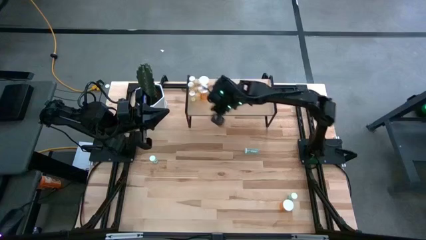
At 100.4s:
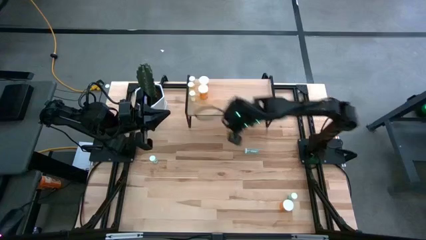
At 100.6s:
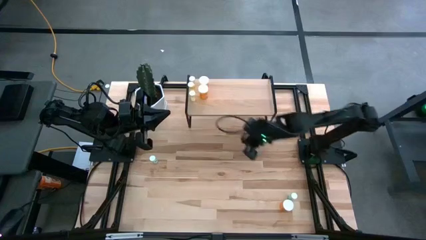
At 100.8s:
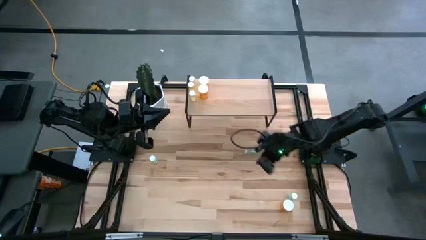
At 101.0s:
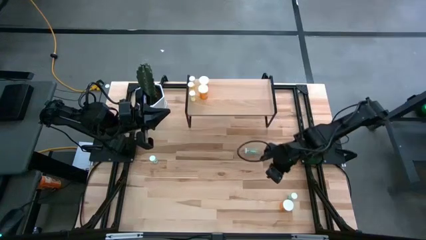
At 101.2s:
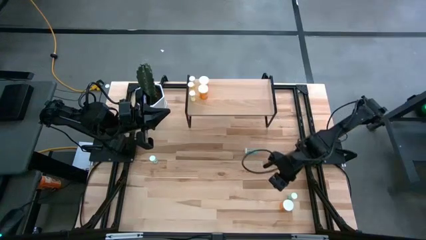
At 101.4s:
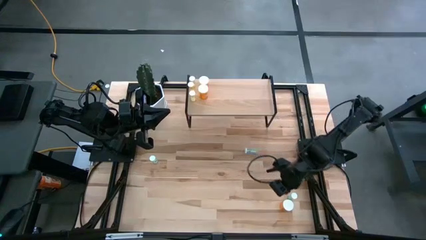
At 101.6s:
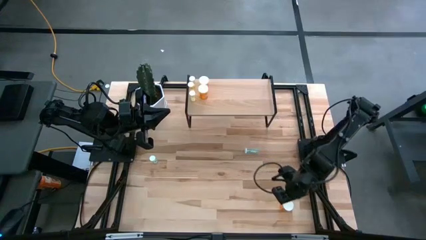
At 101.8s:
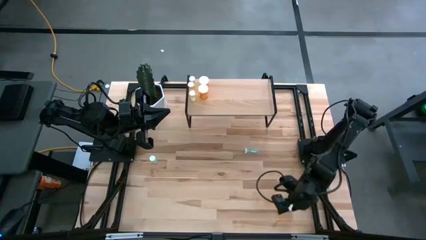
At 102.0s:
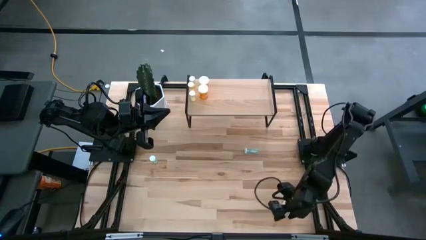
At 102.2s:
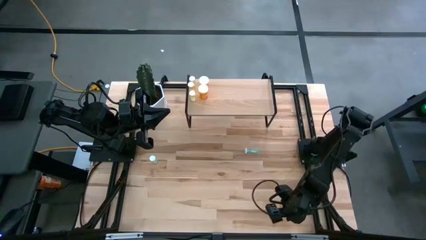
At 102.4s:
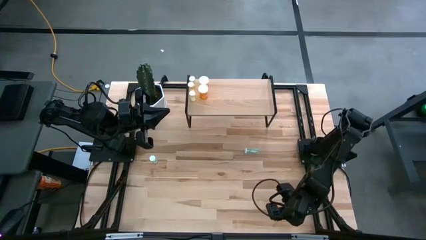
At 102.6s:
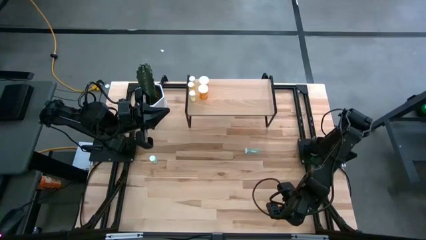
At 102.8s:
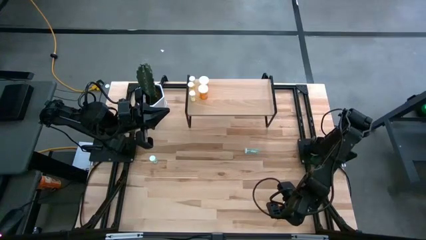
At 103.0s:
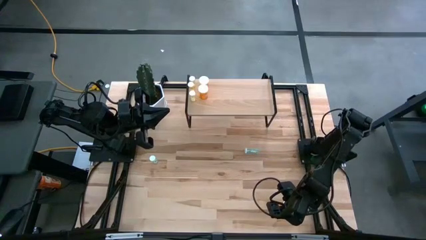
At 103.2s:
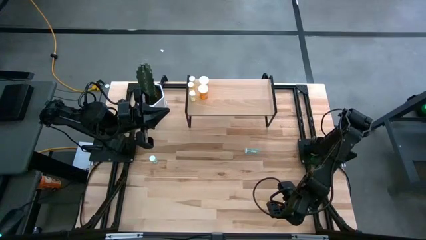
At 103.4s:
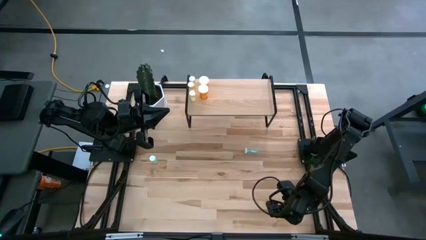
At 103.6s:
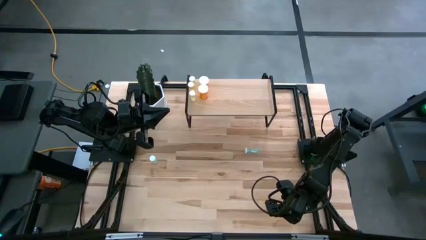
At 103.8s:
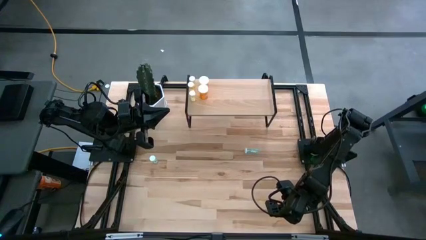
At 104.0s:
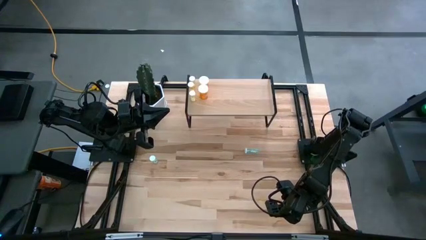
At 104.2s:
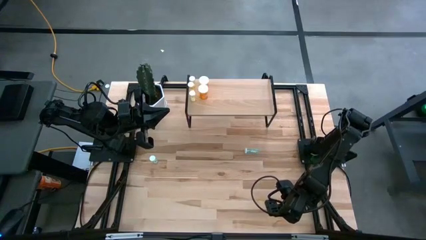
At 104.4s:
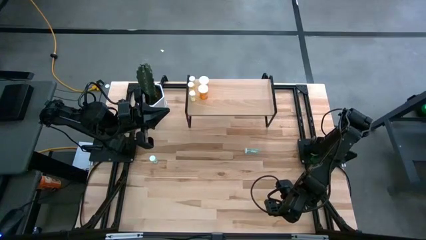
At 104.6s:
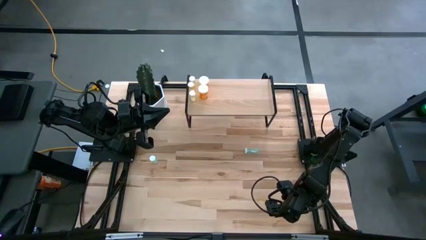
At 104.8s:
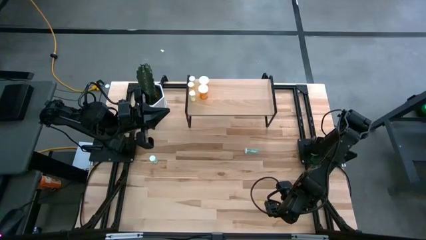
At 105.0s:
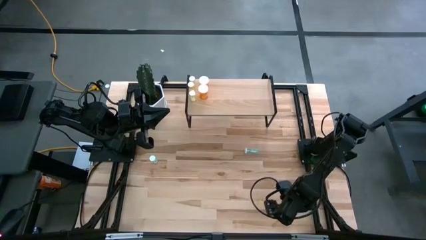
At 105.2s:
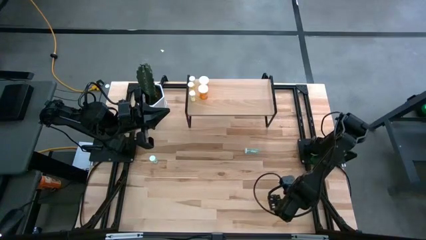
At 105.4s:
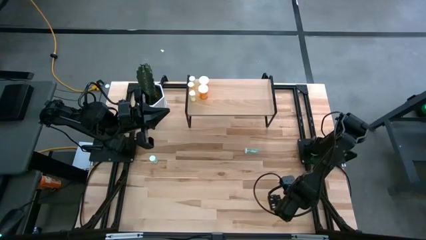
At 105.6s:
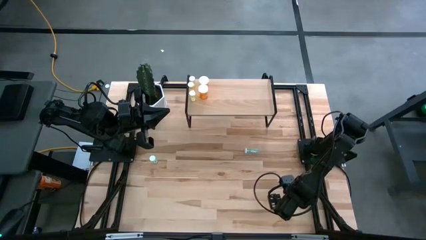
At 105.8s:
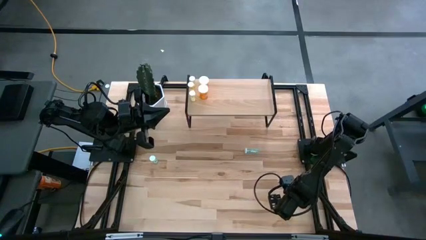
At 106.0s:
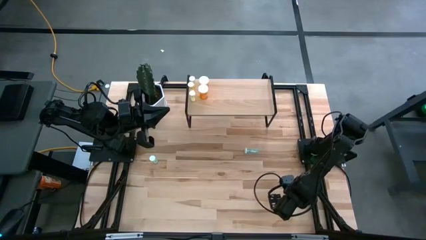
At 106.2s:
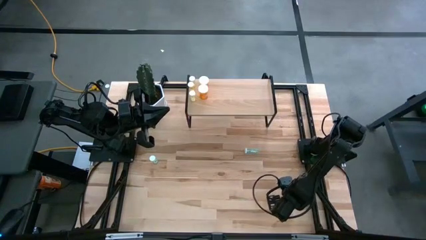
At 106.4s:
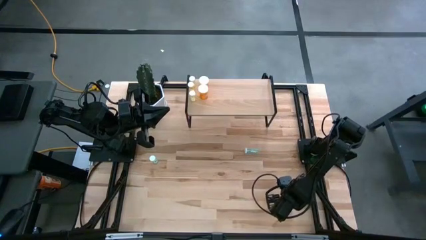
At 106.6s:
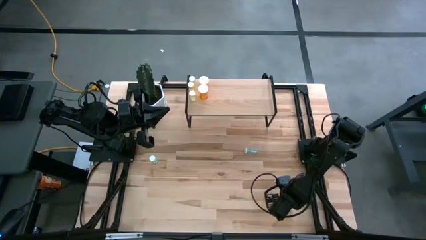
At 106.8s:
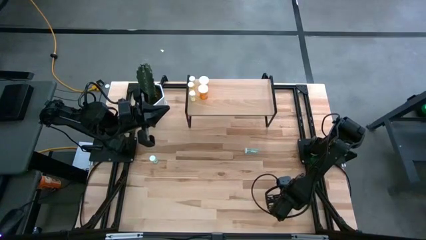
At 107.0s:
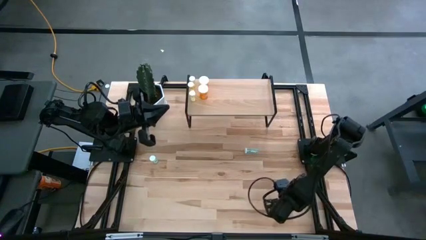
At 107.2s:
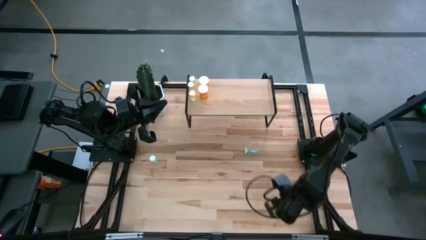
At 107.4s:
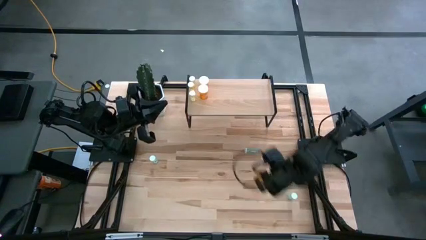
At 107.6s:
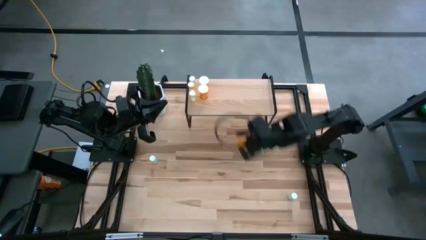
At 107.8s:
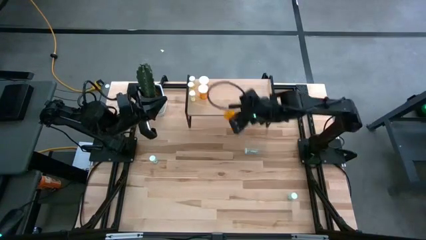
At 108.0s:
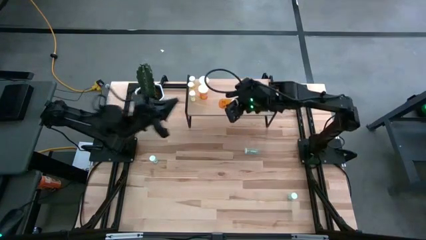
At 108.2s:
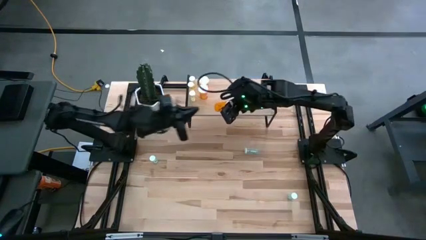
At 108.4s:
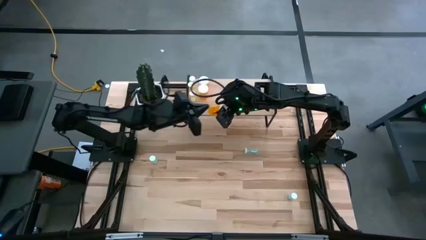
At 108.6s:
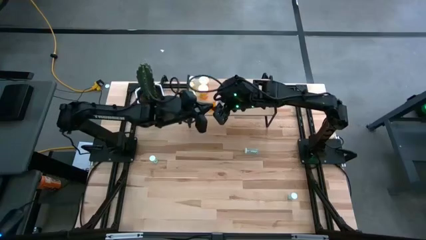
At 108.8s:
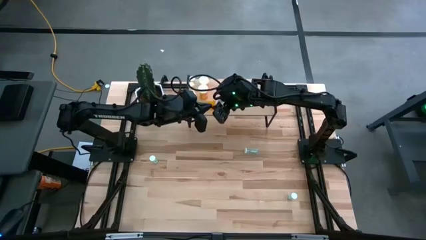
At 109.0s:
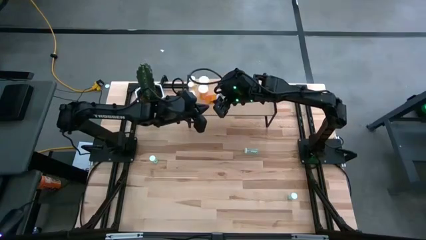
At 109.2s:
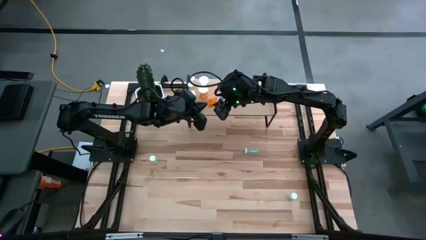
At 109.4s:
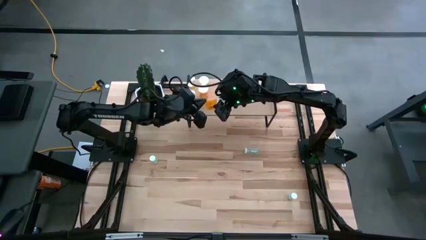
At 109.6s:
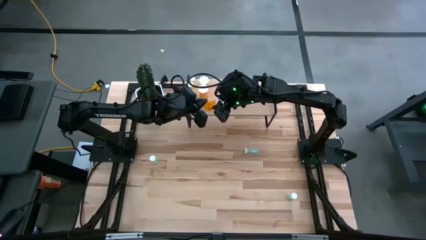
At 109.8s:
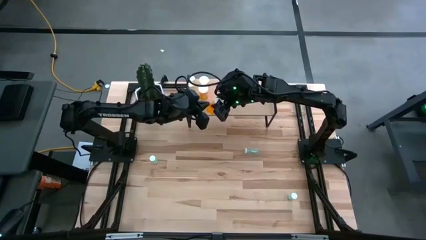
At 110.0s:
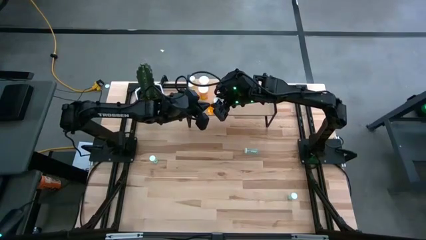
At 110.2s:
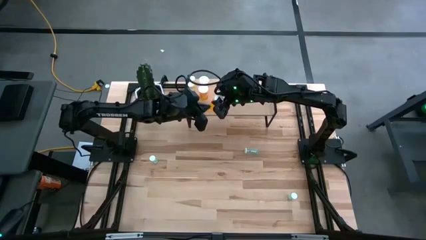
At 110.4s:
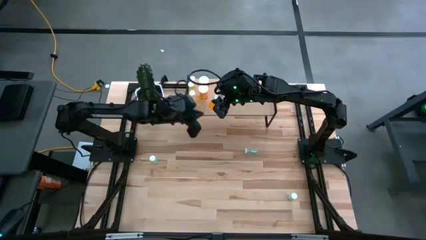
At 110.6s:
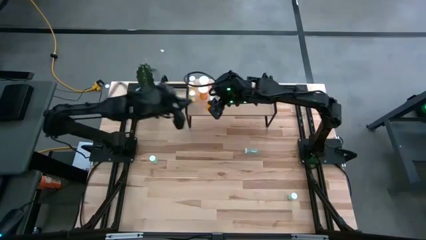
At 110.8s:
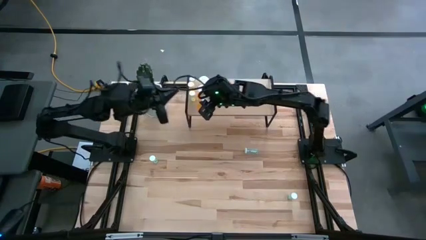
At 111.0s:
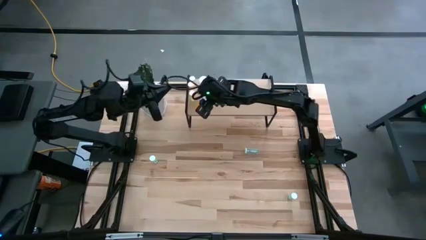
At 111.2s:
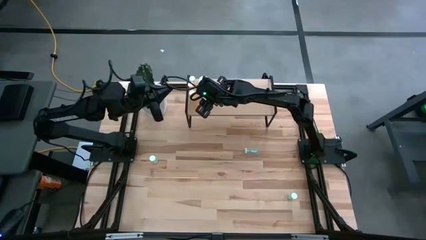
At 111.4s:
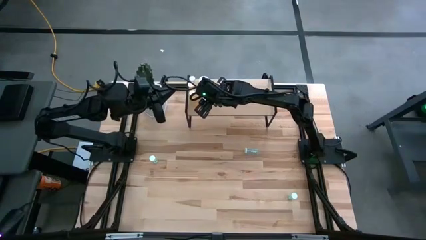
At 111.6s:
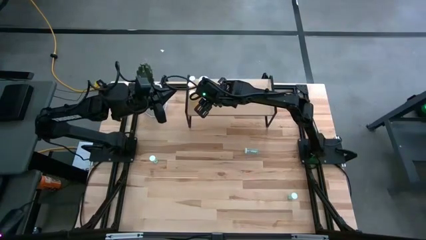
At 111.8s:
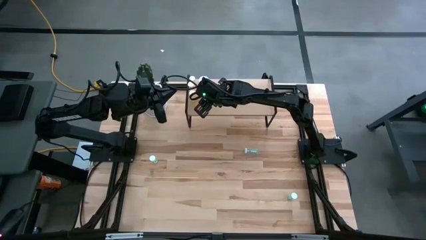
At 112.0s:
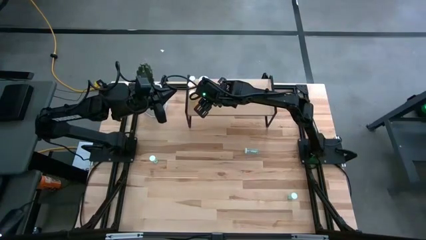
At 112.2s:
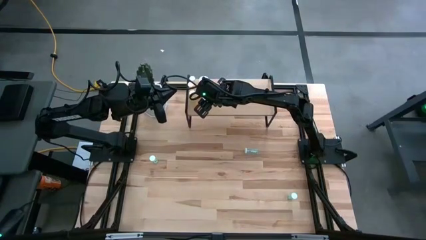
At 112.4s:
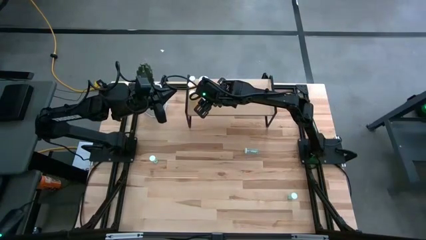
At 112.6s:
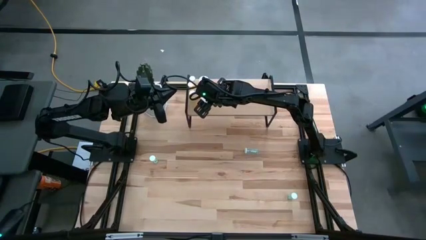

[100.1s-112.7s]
Task: Pick and place medicine bottles onto shelf by color
Align the orange pill bottle with the other yellow pill bottles on the shelf

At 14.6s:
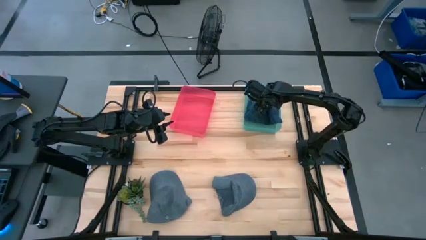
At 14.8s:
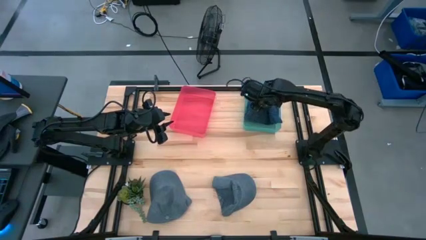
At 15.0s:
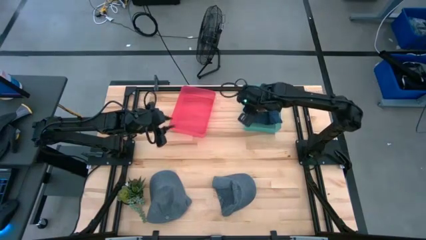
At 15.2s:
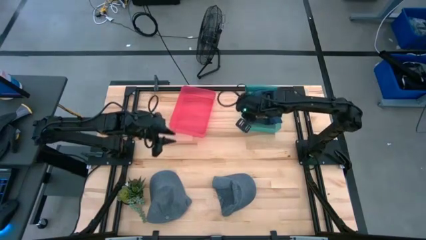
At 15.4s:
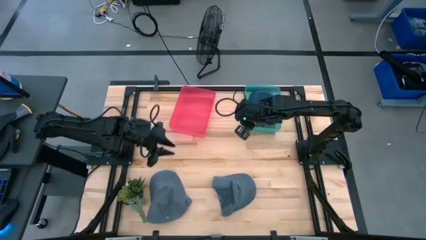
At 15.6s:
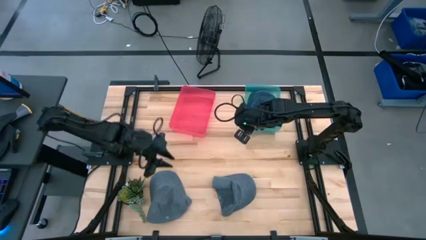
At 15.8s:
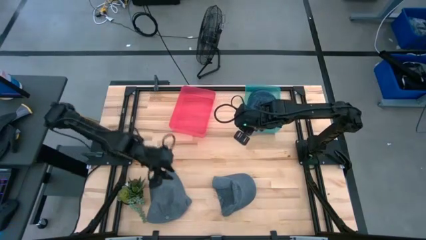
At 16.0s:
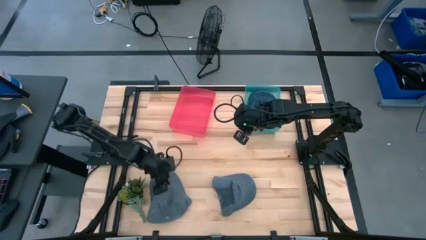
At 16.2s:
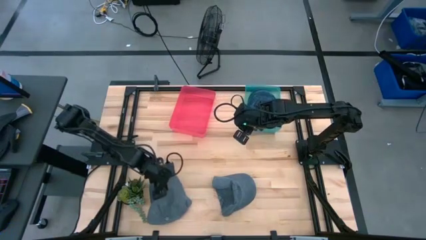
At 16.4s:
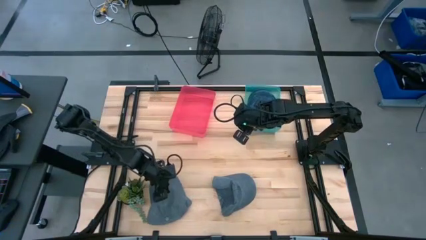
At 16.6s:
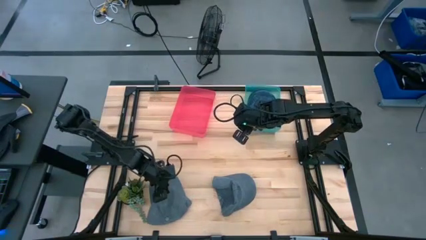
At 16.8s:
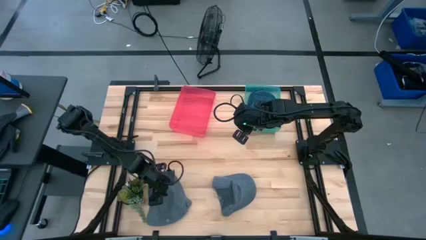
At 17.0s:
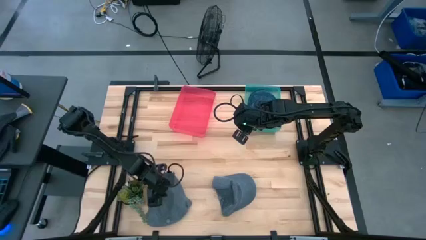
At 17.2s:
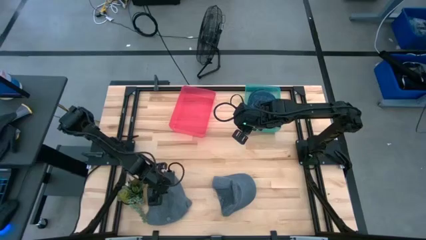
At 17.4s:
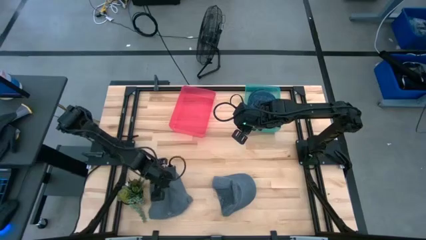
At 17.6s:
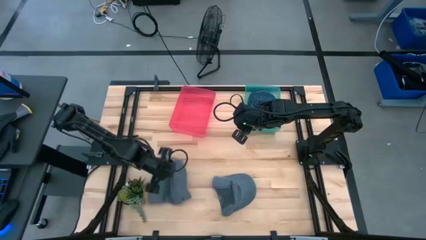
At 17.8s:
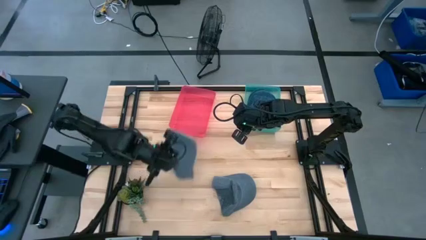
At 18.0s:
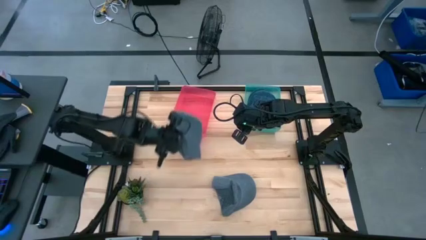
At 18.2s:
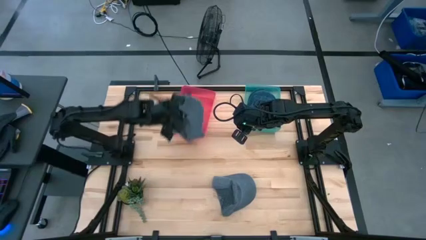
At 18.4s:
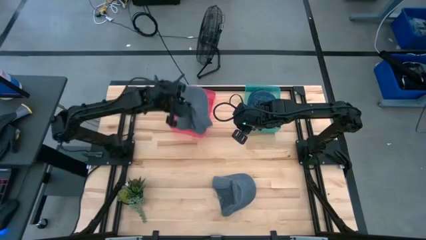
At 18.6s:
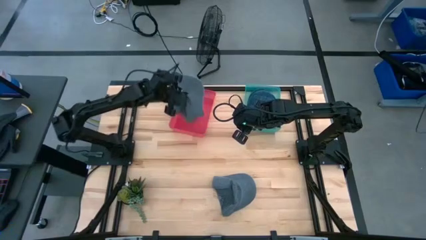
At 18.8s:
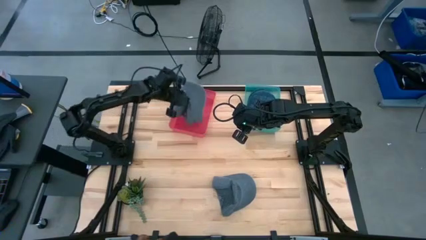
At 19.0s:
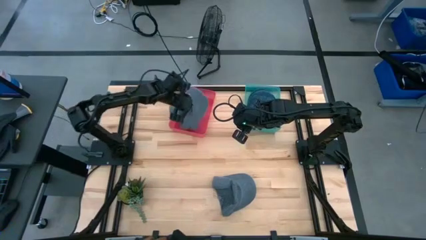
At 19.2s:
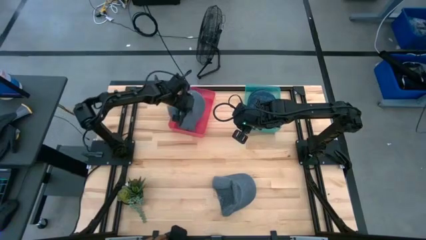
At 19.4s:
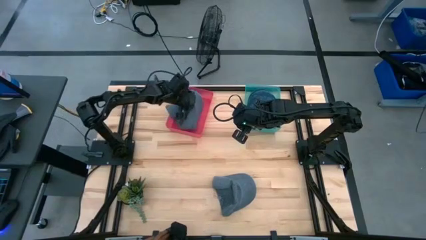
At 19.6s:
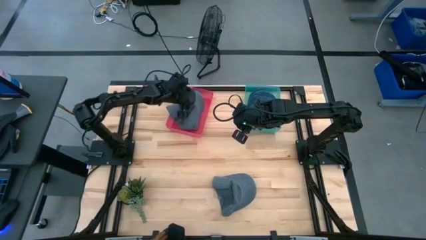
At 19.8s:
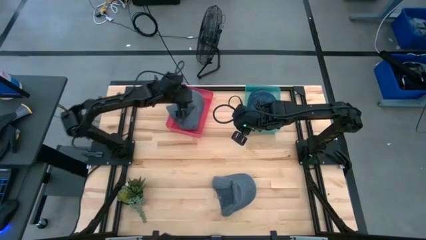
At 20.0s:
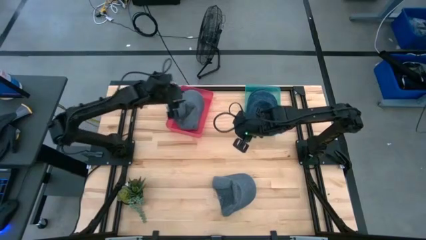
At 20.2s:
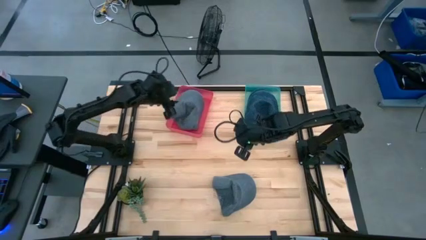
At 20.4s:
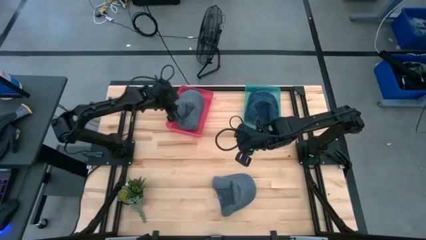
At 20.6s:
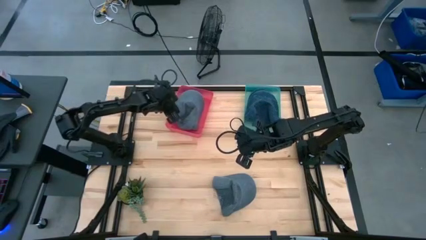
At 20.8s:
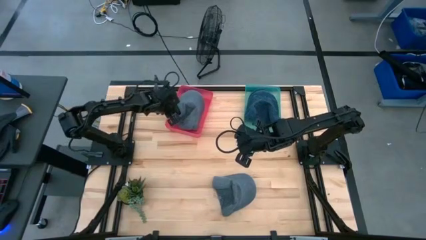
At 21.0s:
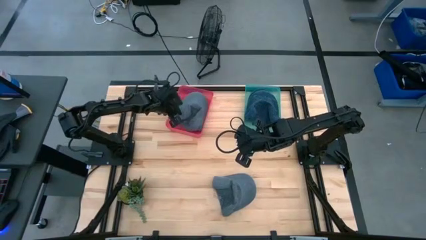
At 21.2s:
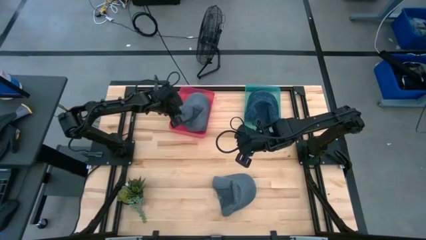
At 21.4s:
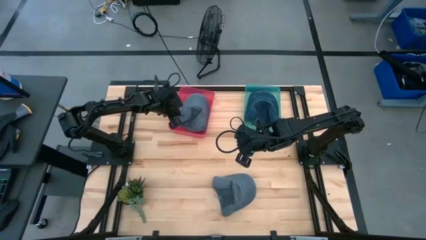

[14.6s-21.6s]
Task: Pick & Place hat
Put the left gray cap into the red bin
